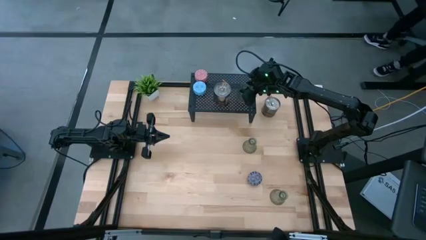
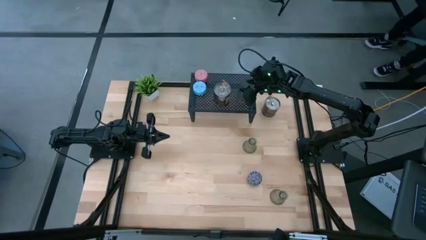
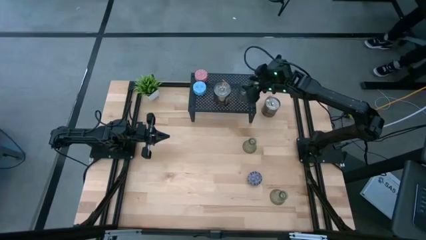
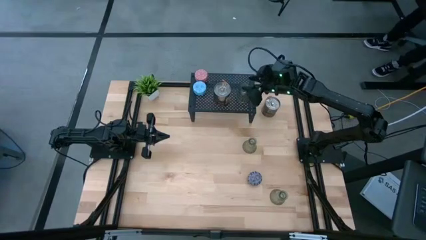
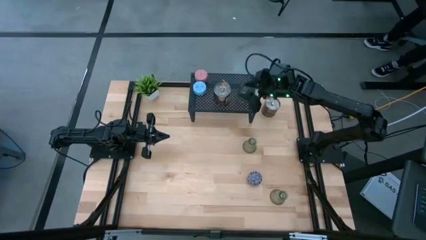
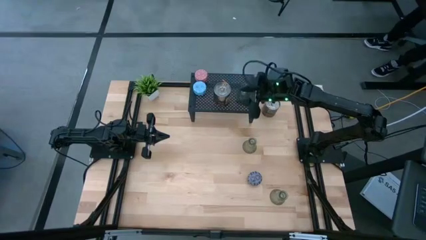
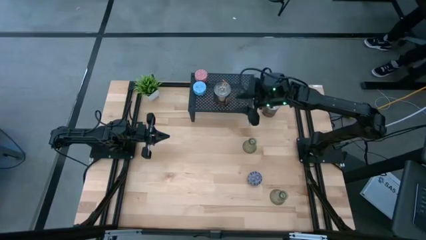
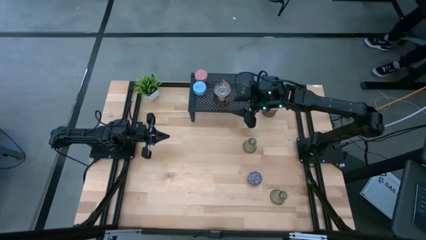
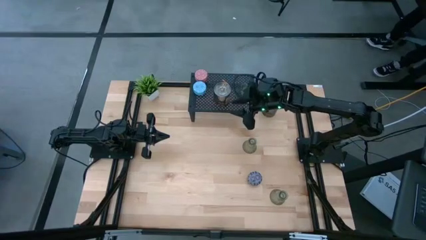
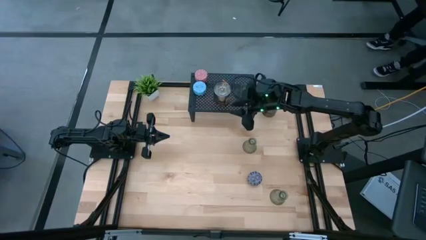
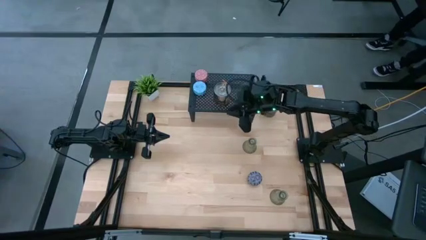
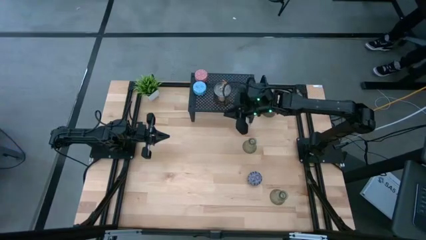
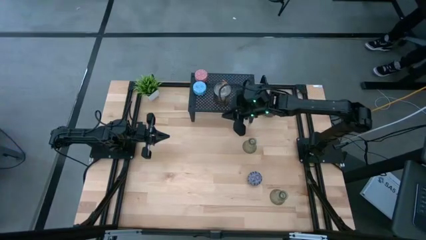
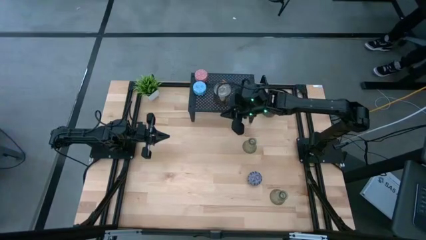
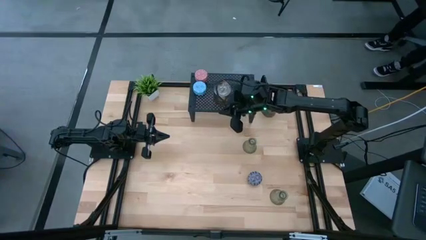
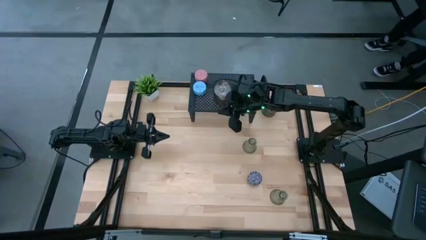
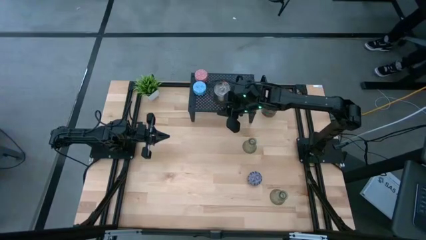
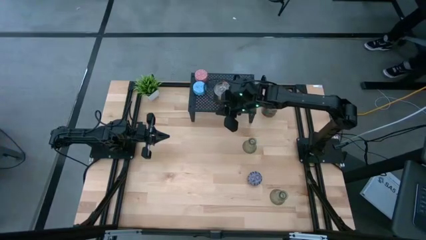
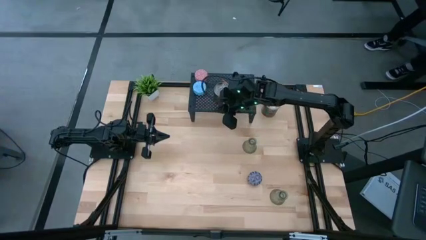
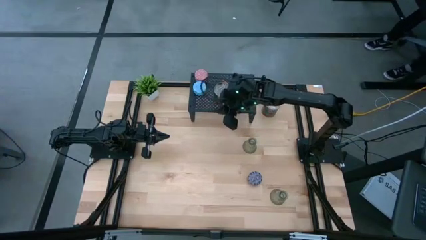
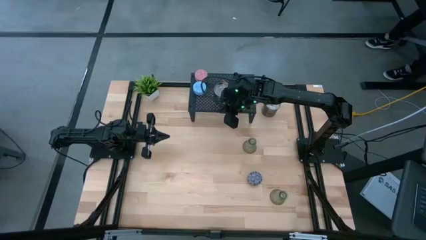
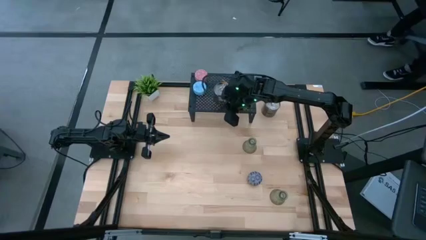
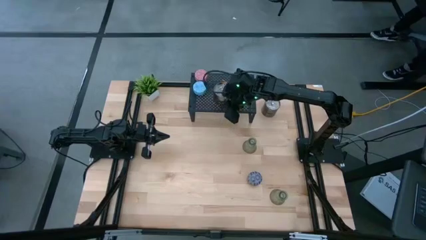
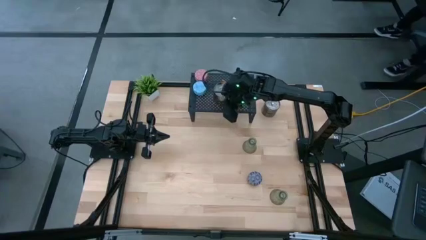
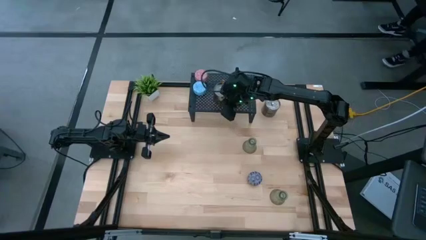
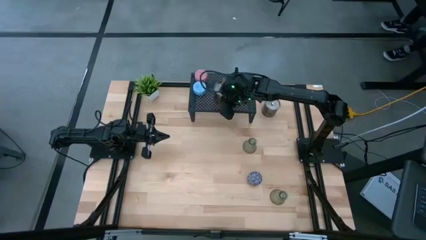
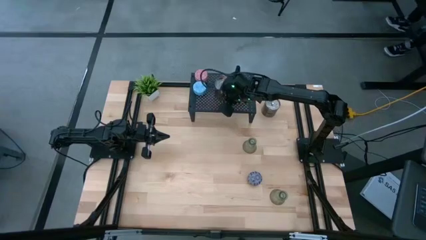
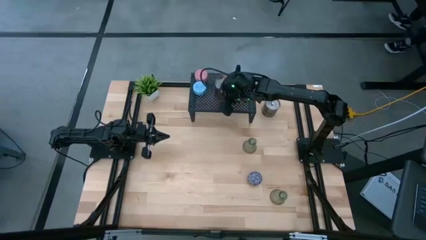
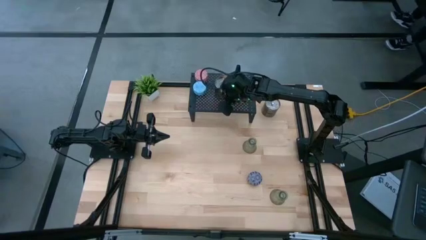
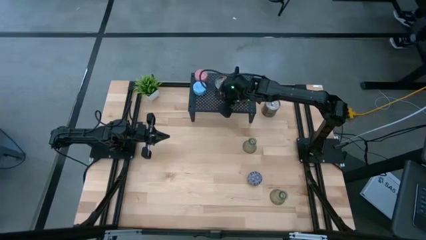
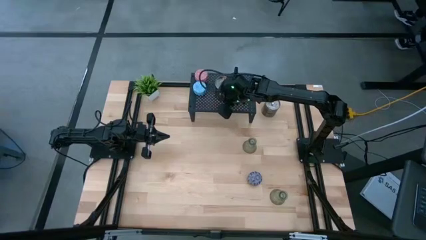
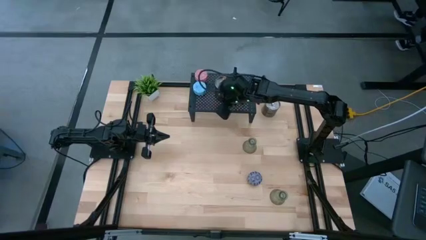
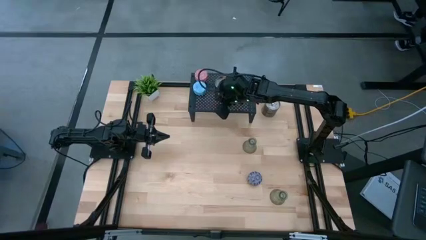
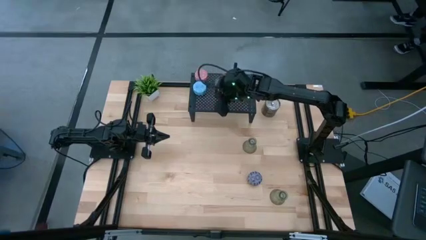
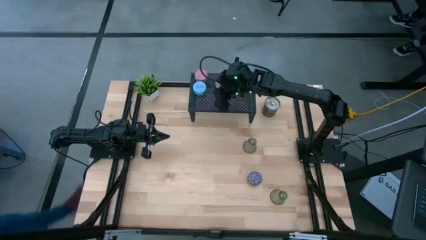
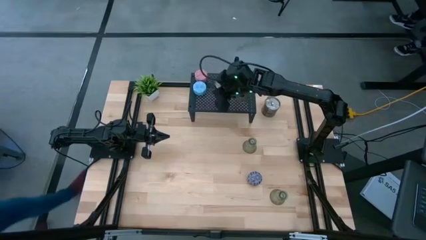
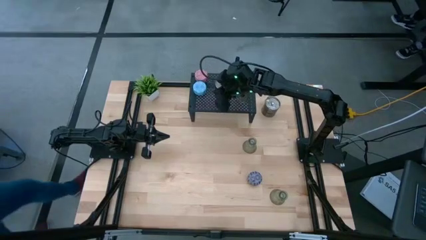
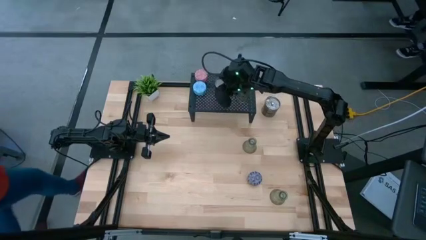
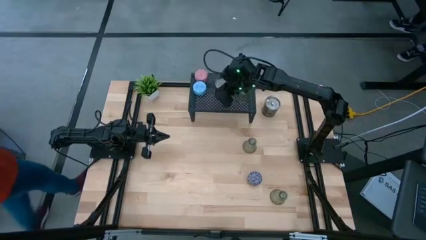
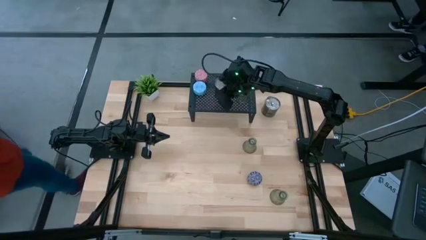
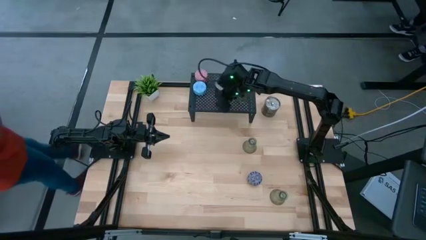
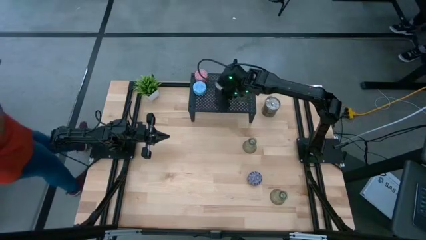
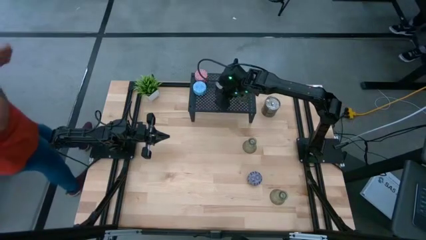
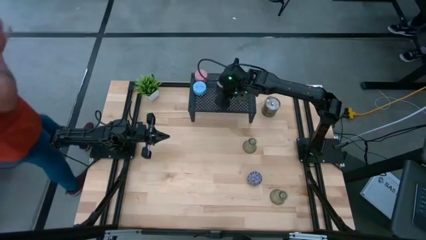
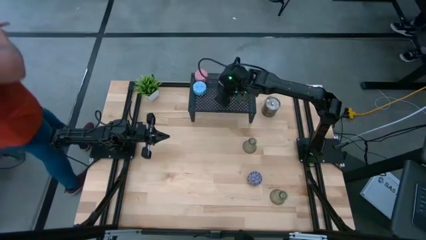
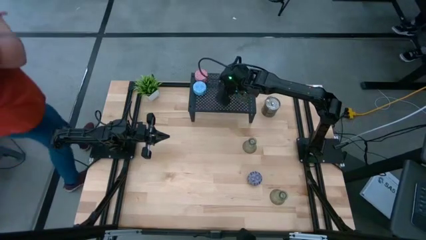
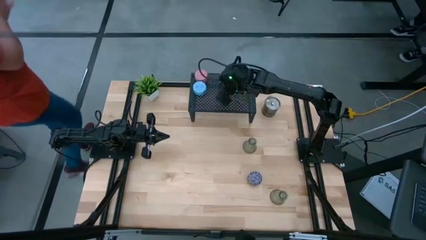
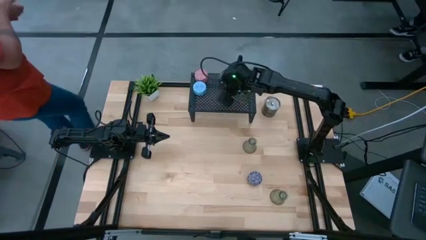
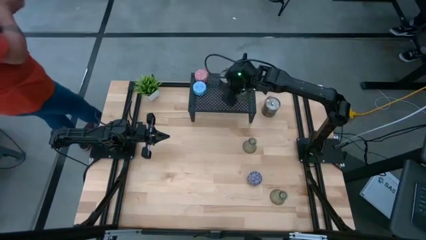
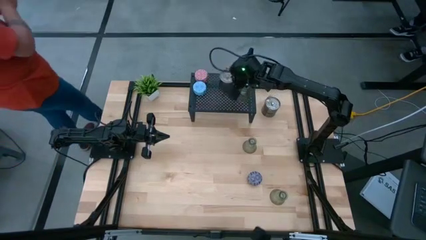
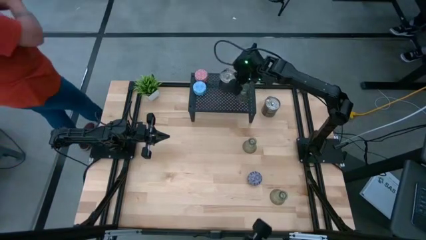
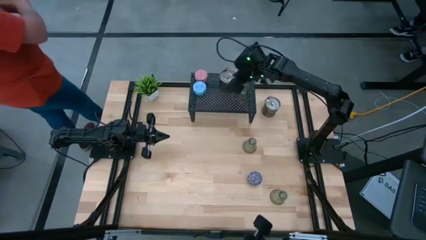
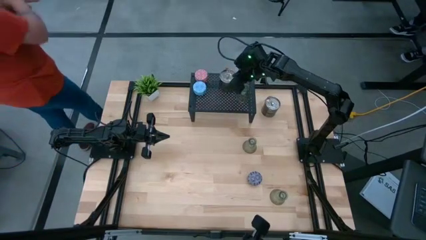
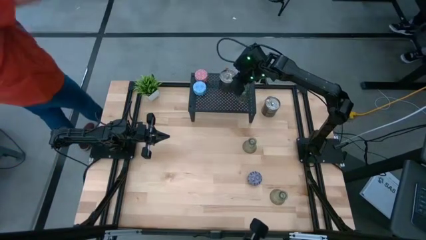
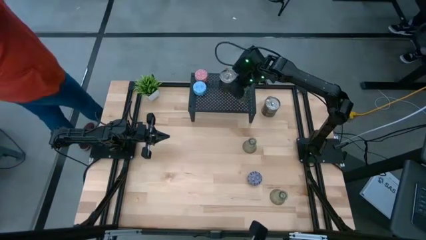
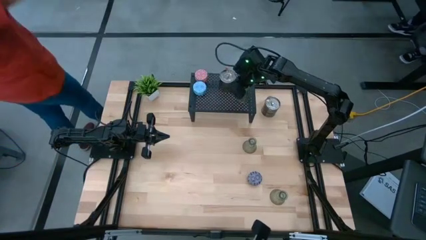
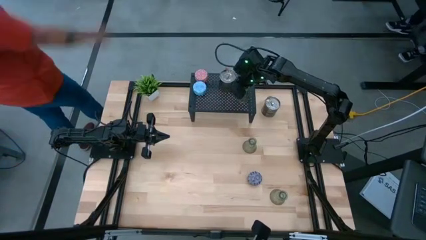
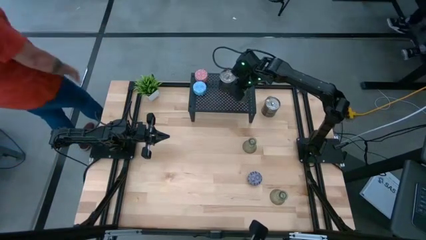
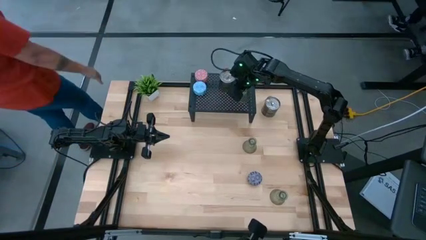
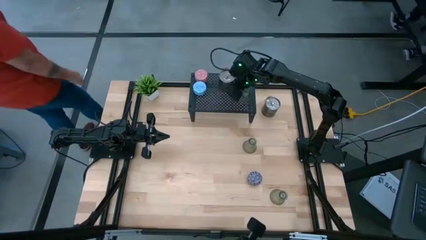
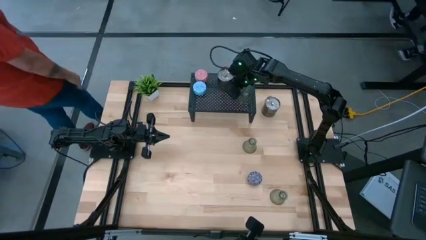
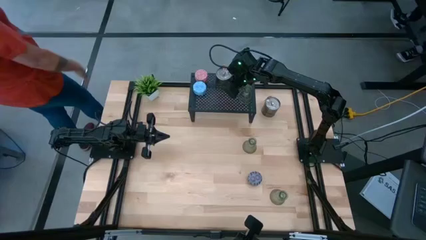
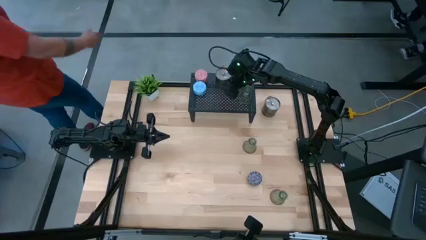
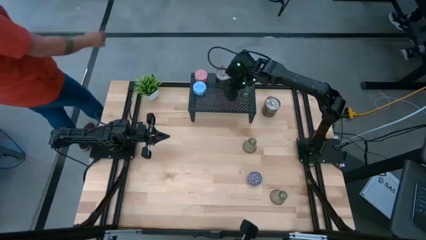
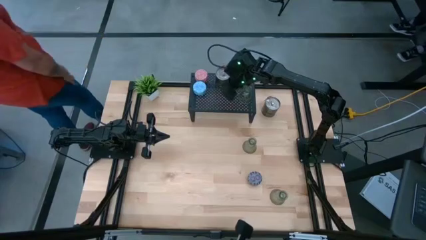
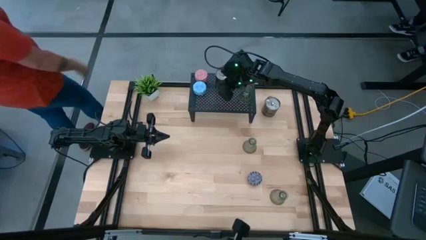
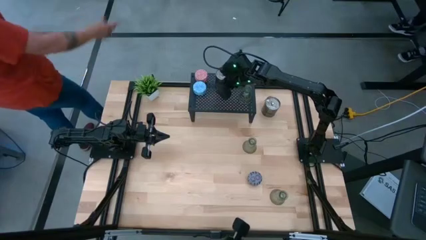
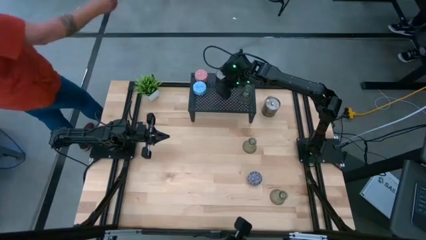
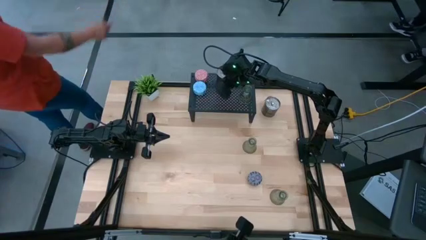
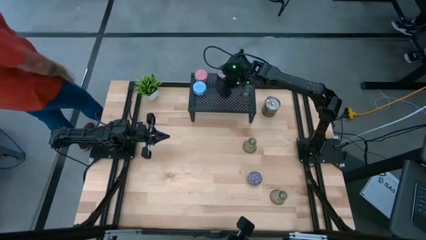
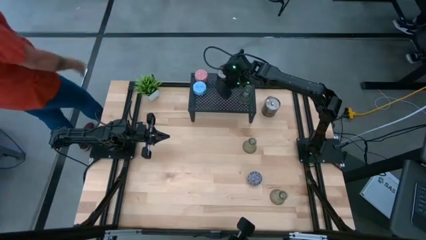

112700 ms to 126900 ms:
Task: Pick & Place candle stick holders
Adjust the silver scented candle on the shelf
